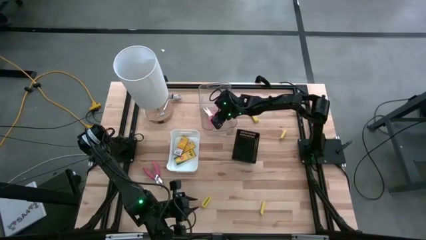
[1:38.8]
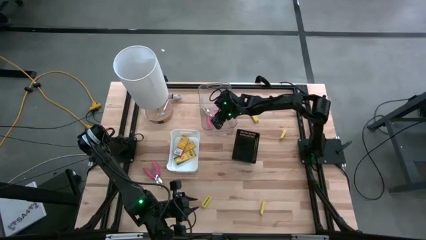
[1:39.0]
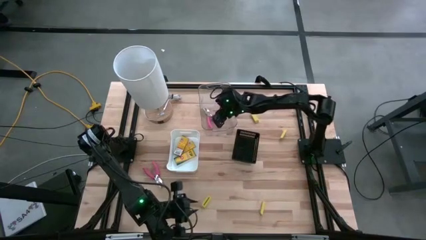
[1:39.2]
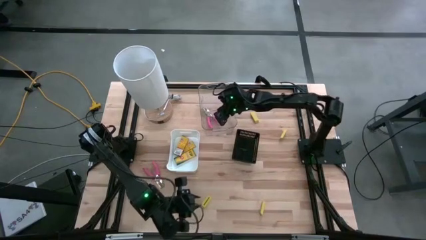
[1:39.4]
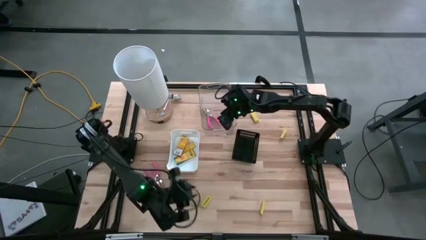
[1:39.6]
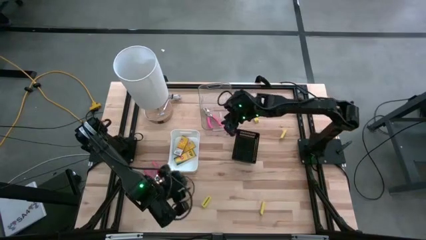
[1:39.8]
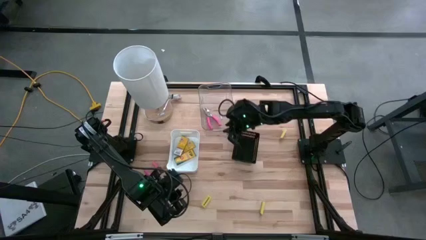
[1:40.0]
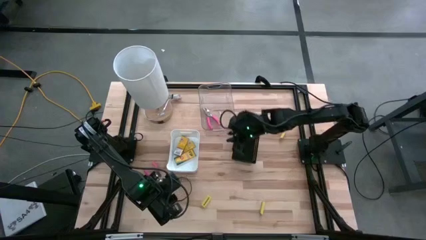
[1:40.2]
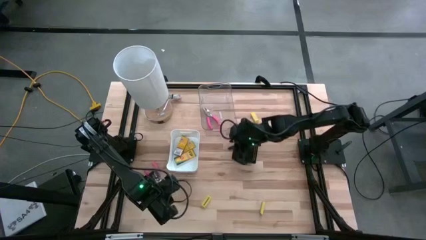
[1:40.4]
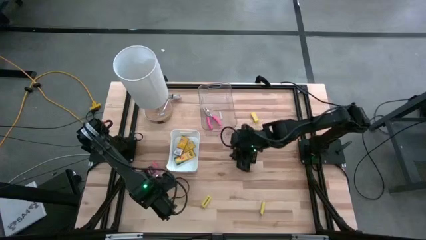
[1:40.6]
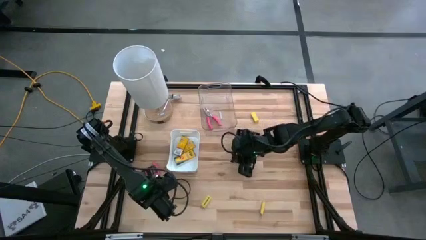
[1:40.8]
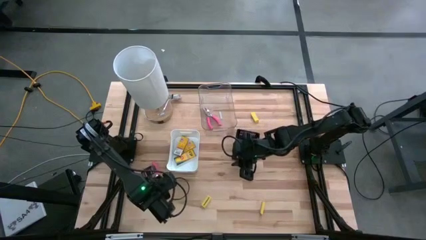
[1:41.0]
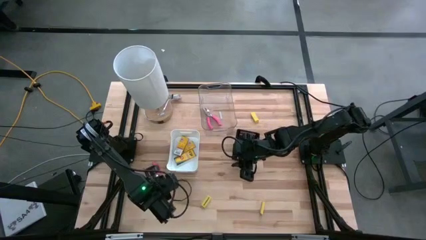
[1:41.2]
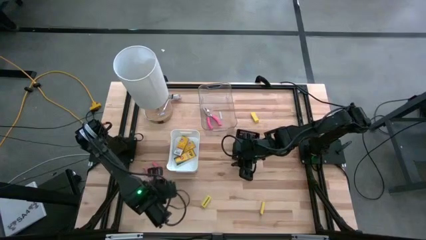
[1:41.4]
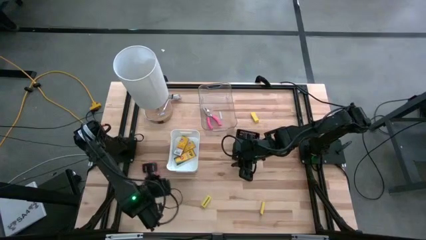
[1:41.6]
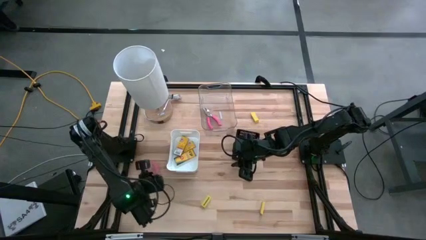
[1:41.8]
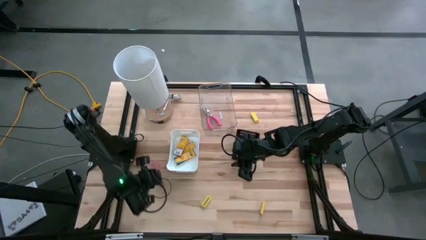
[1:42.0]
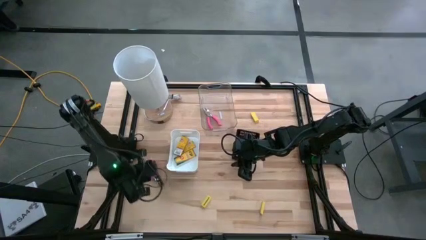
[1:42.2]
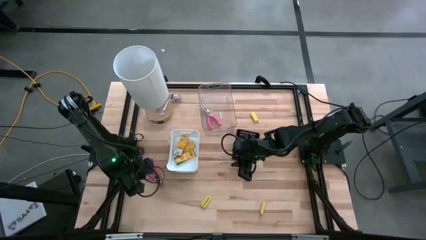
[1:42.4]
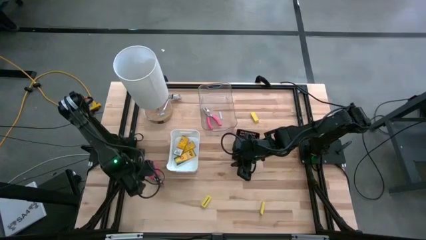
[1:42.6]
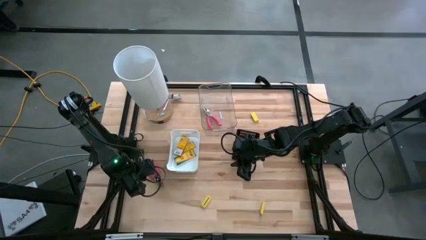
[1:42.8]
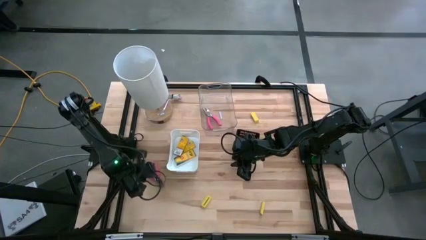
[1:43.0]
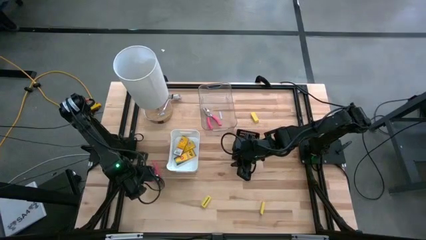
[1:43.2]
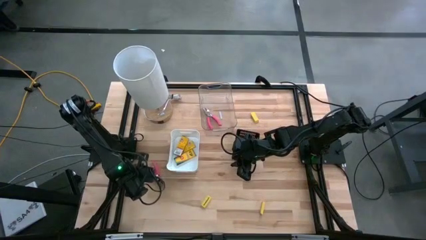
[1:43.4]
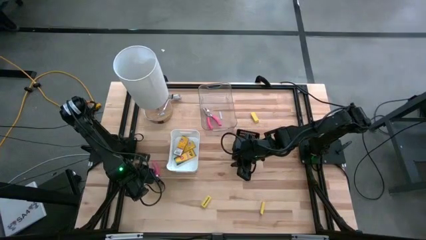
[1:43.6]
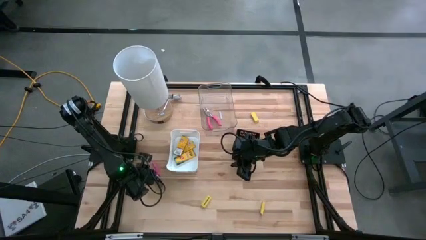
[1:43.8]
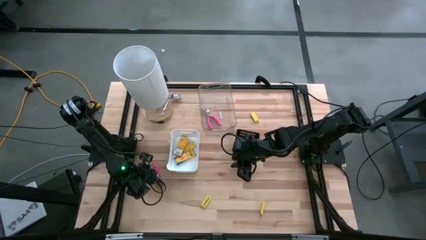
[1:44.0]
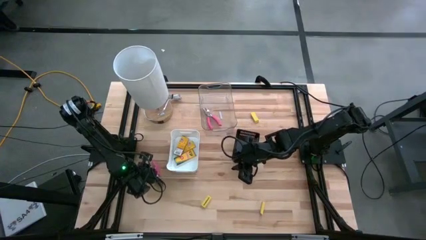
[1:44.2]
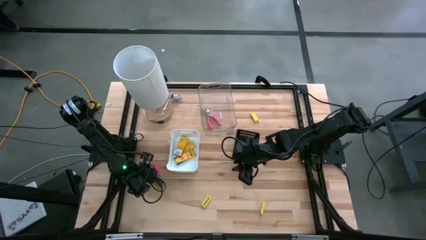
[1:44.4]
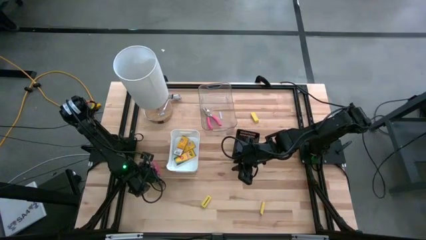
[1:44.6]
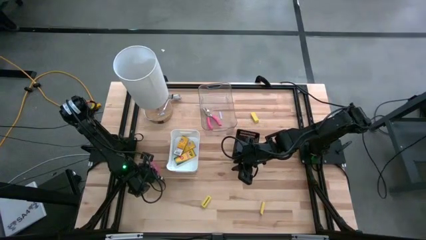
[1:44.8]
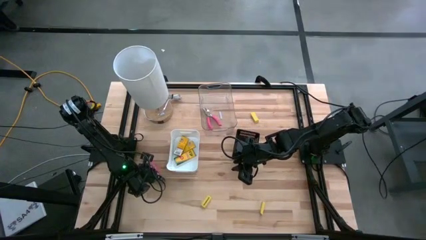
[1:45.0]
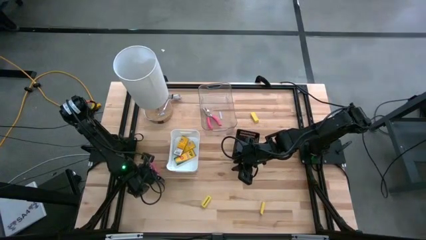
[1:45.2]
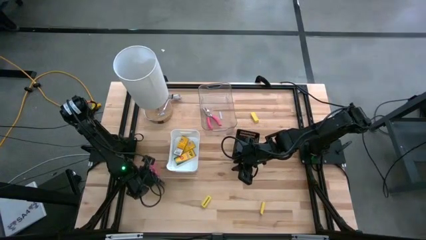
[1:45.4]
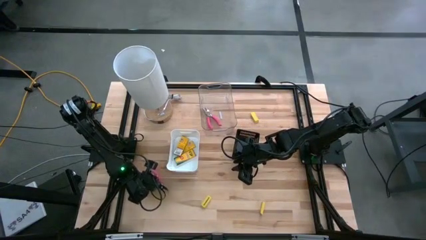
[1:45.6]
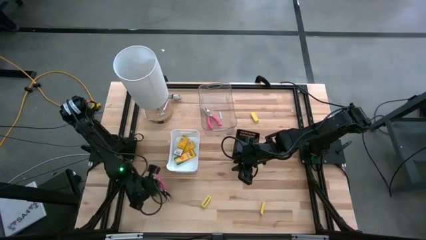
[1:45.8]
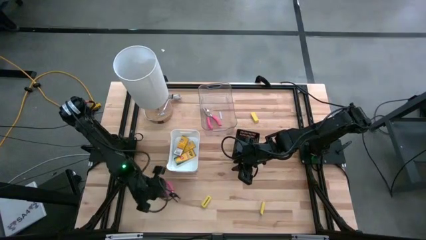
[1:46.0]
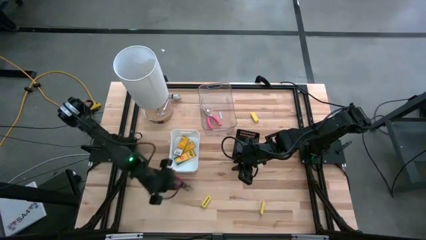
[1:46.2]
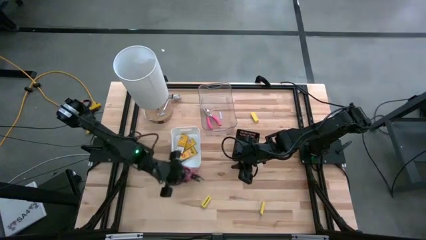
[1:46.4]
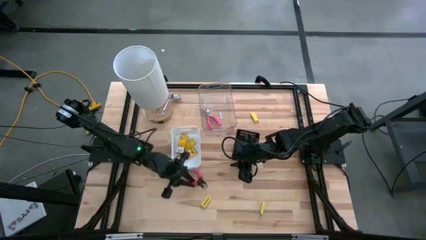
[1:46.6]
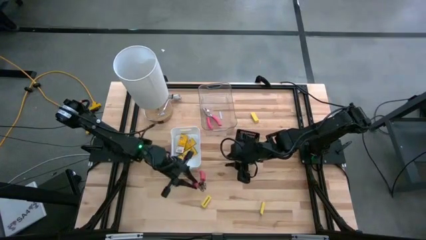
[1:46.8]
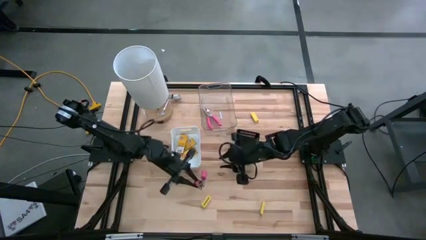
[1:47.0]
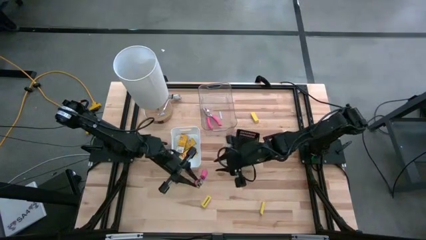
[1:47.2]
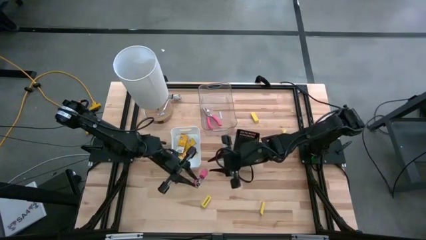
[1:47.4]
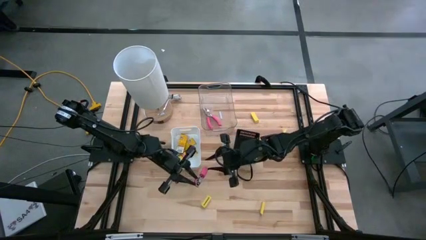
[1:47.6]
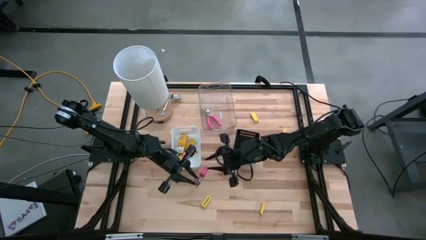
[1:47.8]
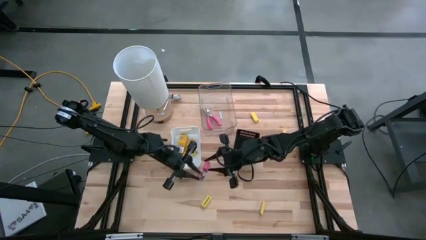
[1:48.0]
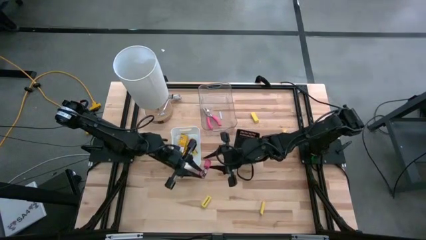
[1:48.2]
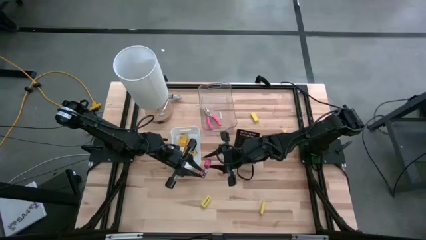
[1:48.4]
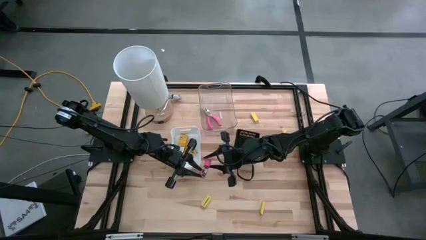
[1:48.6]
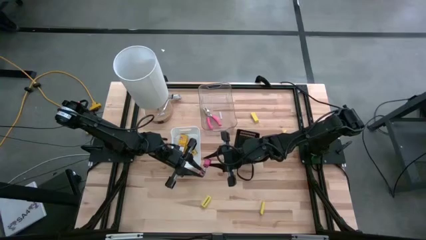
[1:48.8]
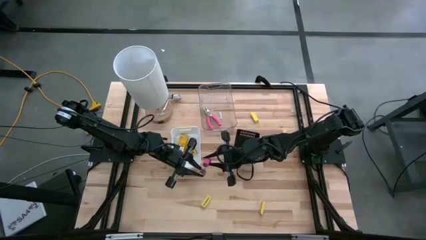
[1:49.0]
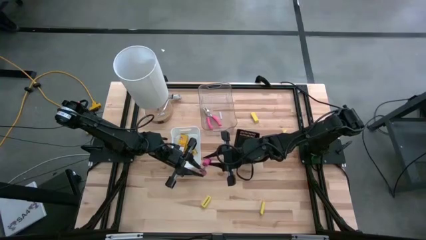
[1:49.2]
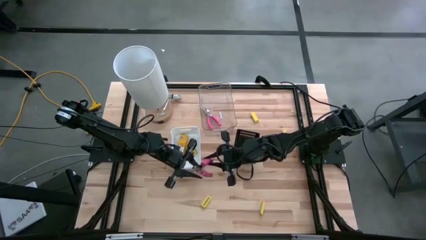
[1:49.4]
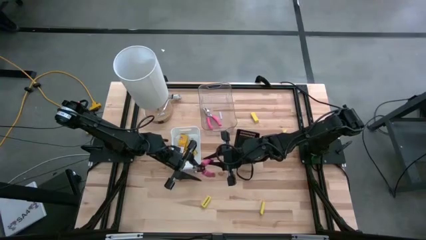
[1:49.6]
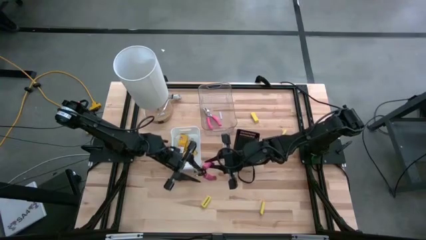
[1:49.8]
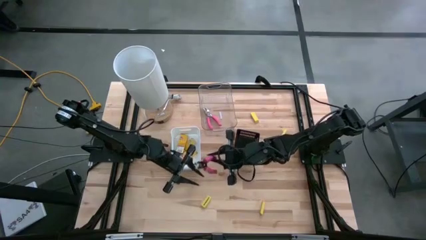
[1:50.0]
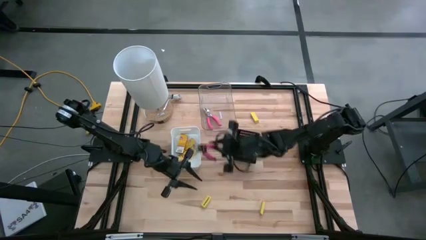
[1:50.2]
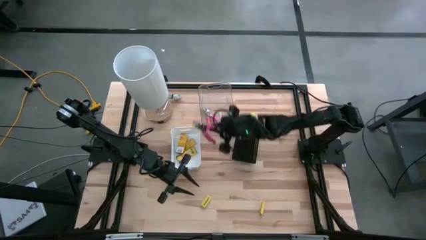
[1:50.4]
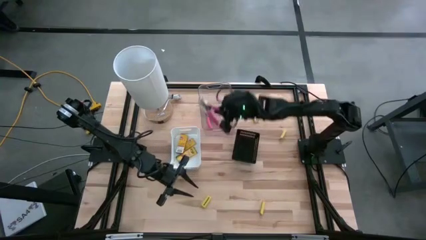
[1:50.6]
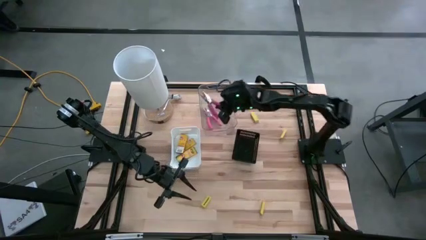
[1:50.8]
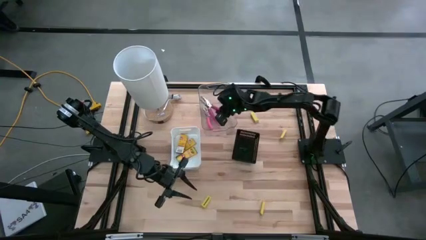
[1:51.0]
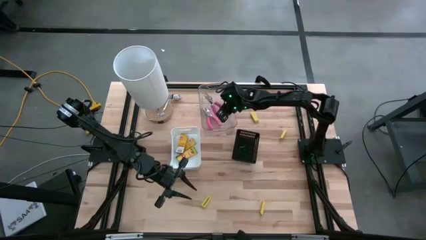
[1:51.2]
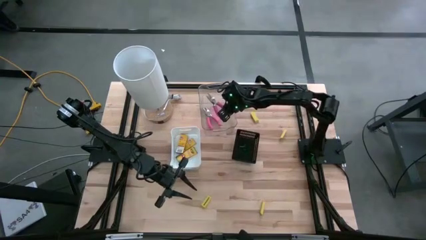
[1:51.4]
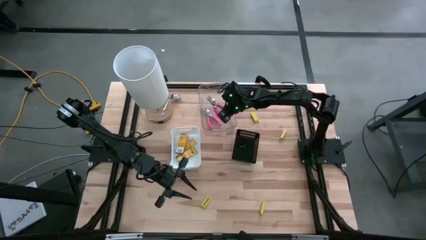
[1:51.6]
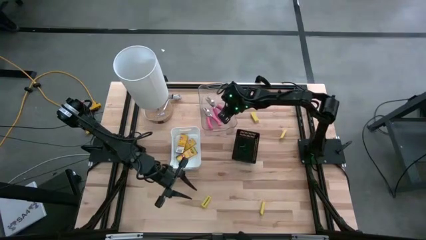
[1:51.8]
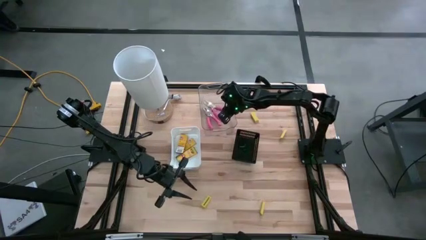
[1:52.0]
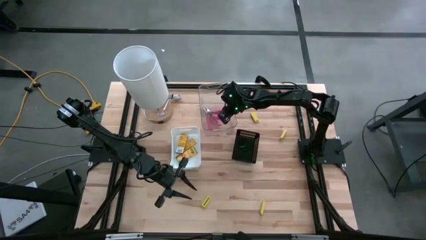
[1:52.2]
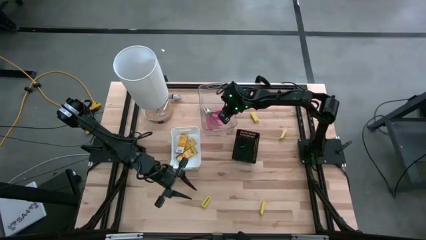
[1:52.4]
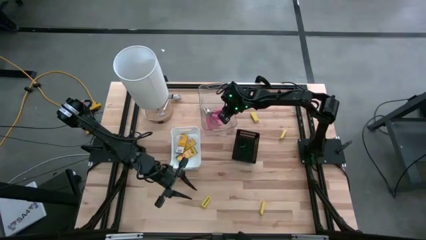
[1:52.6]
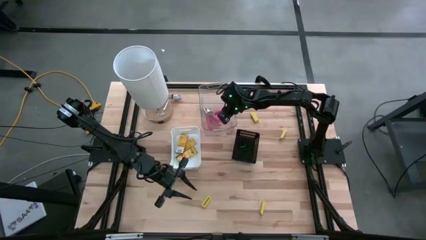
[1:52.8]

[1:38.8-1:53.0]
Task: Pick & Place School Supplies
Put the hole puncher into the transparent bin
